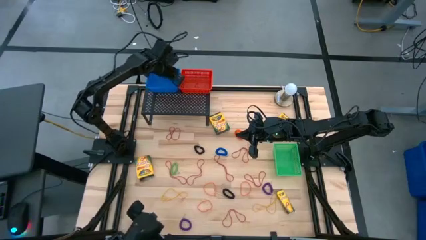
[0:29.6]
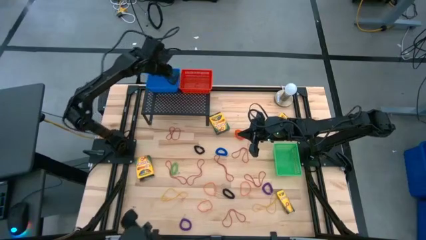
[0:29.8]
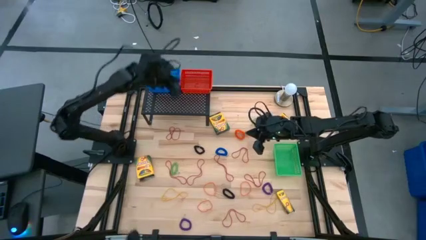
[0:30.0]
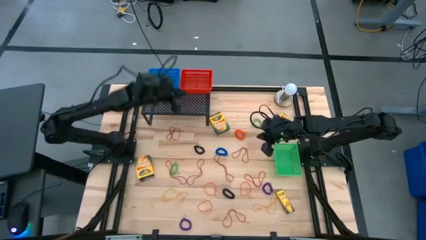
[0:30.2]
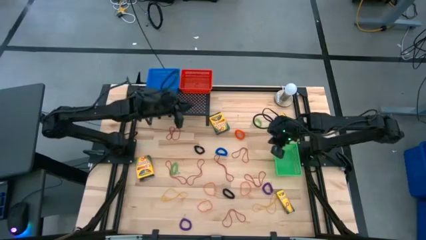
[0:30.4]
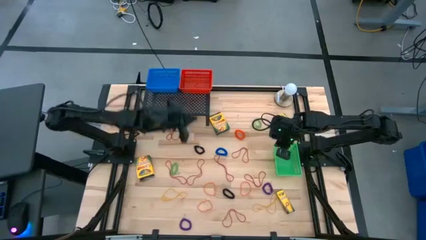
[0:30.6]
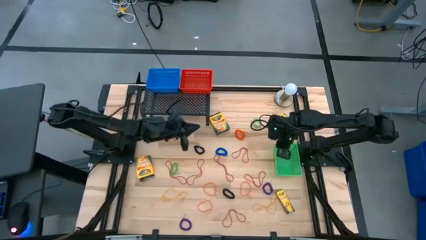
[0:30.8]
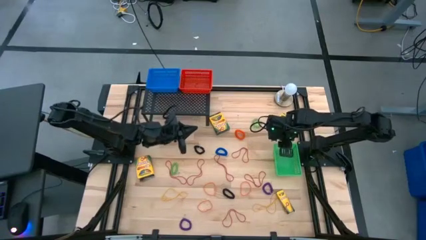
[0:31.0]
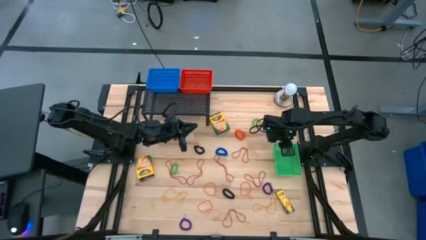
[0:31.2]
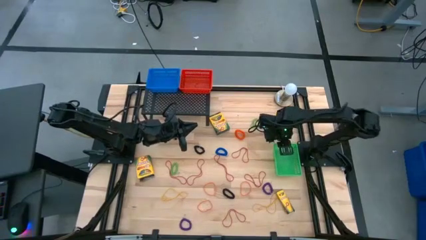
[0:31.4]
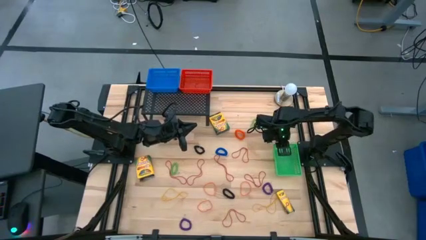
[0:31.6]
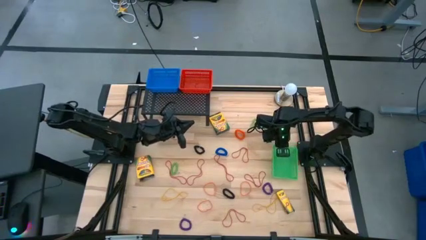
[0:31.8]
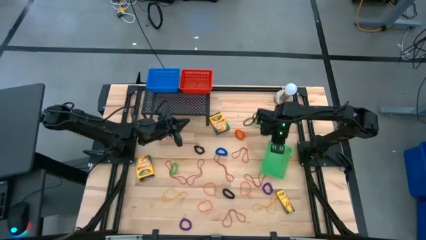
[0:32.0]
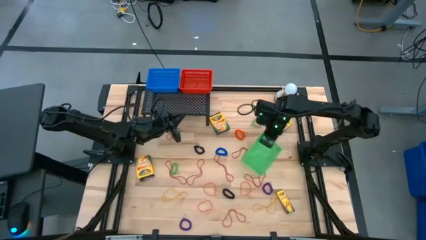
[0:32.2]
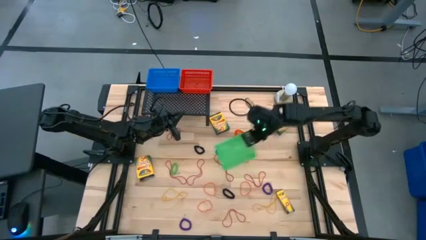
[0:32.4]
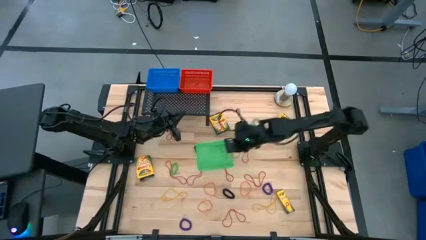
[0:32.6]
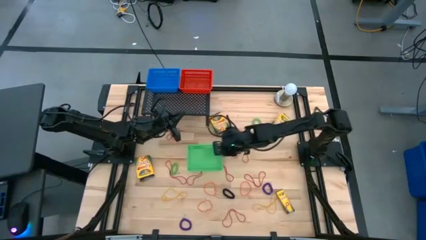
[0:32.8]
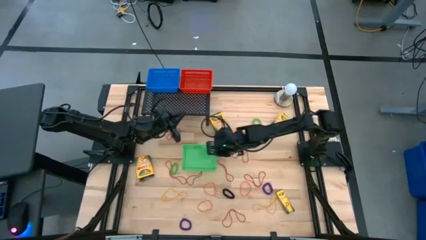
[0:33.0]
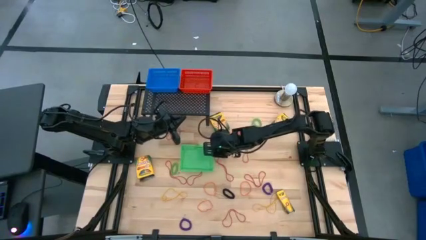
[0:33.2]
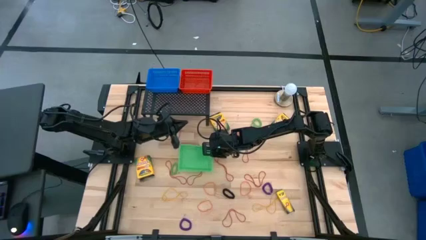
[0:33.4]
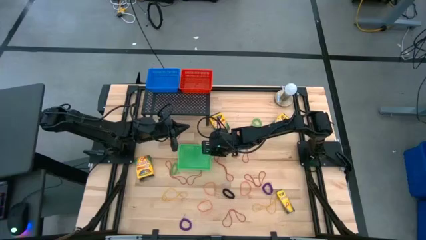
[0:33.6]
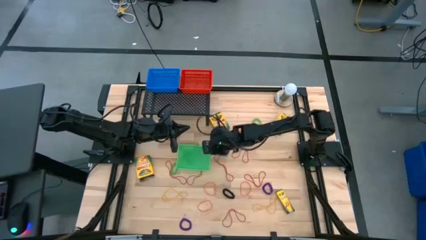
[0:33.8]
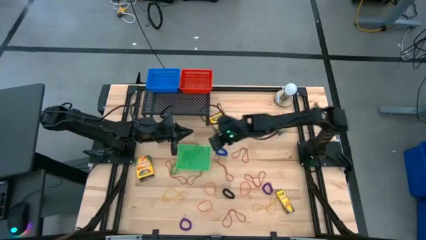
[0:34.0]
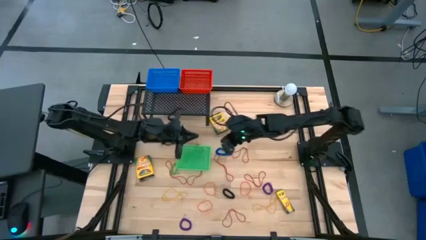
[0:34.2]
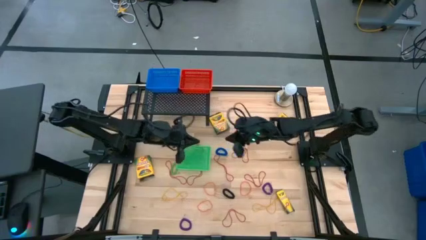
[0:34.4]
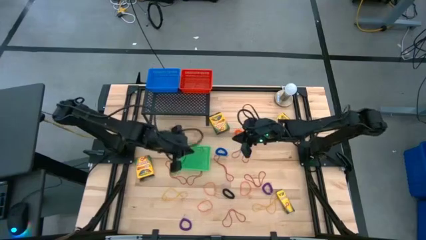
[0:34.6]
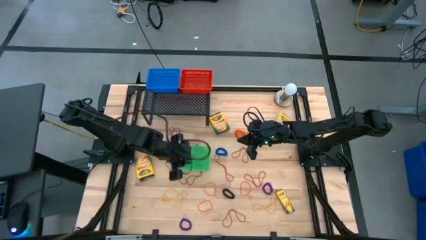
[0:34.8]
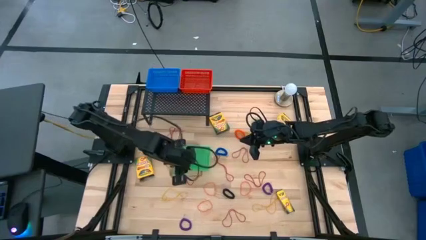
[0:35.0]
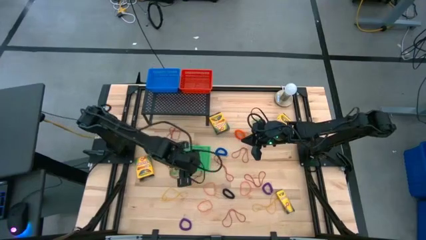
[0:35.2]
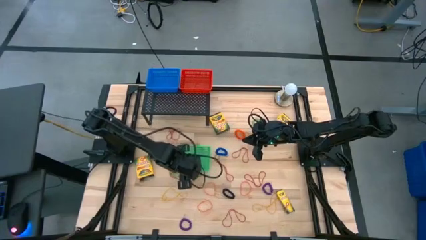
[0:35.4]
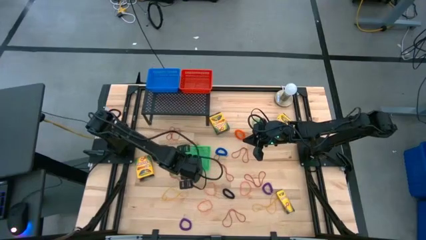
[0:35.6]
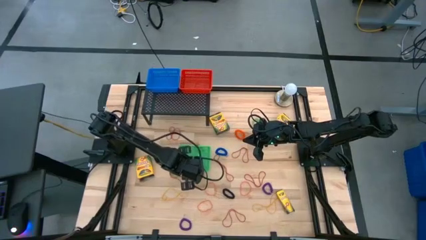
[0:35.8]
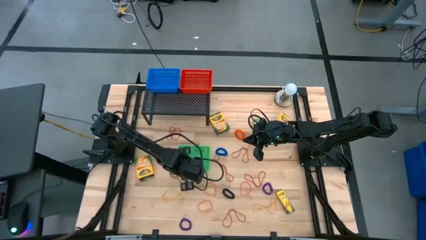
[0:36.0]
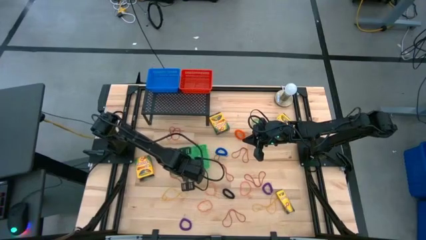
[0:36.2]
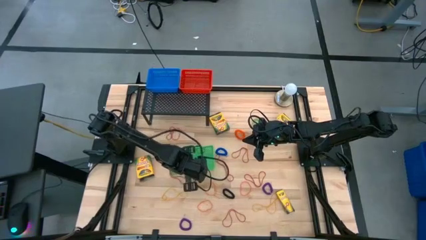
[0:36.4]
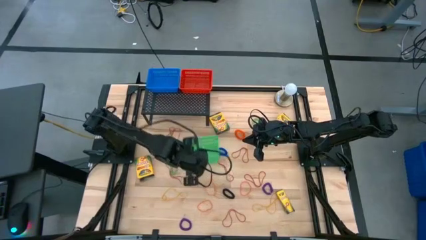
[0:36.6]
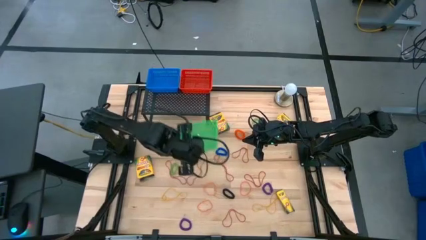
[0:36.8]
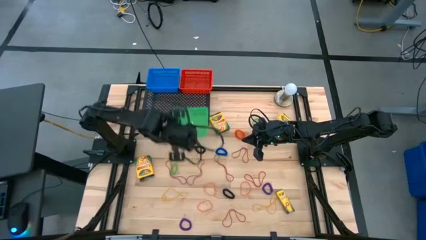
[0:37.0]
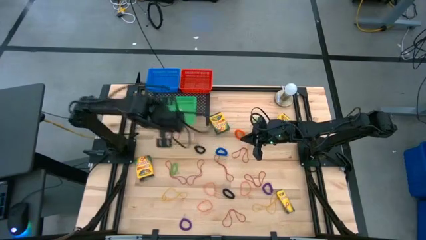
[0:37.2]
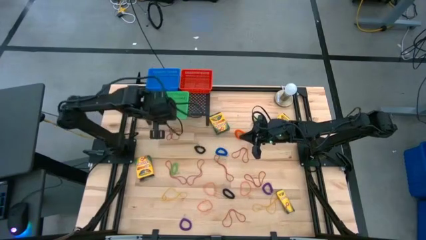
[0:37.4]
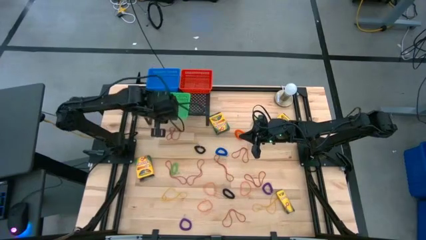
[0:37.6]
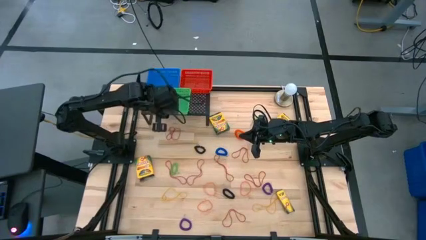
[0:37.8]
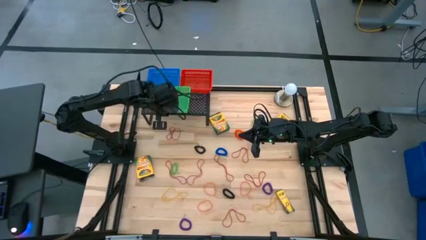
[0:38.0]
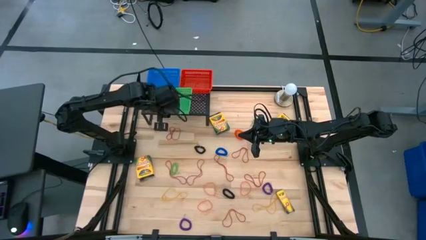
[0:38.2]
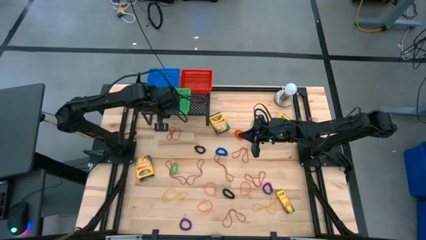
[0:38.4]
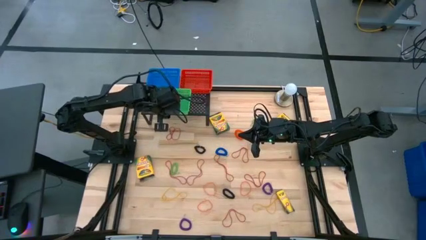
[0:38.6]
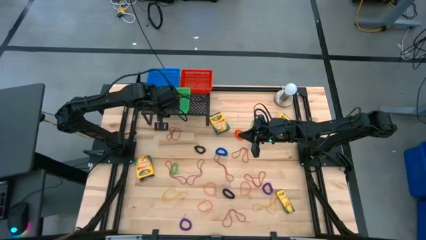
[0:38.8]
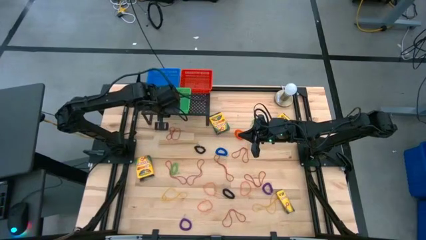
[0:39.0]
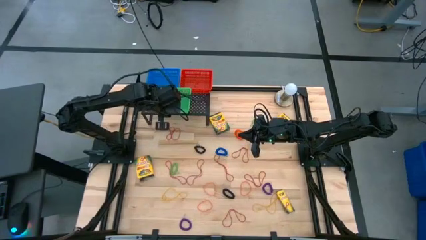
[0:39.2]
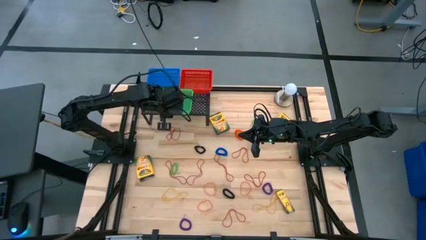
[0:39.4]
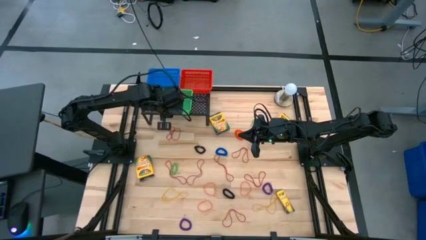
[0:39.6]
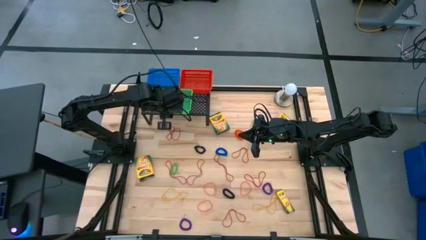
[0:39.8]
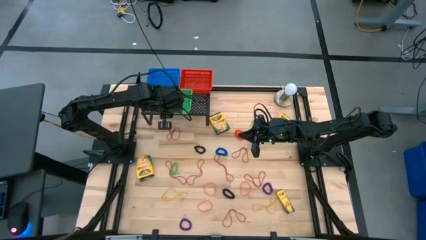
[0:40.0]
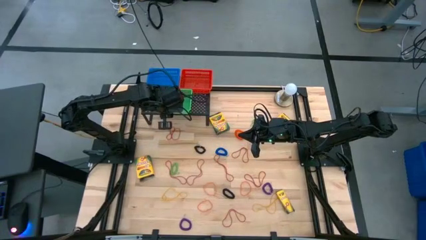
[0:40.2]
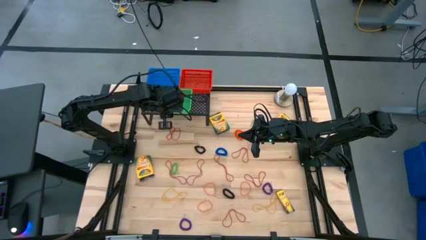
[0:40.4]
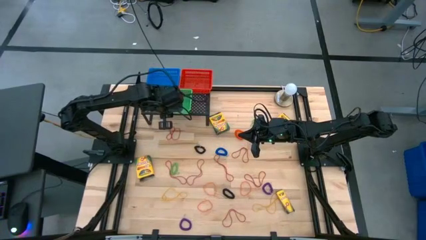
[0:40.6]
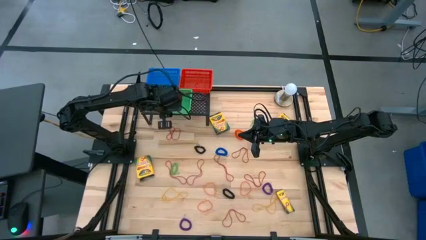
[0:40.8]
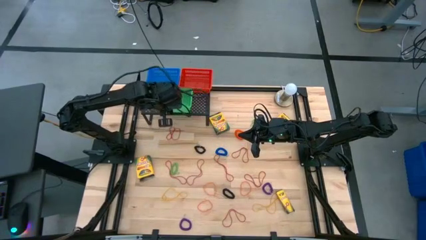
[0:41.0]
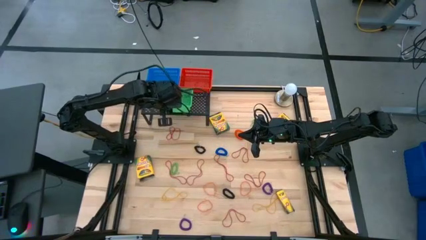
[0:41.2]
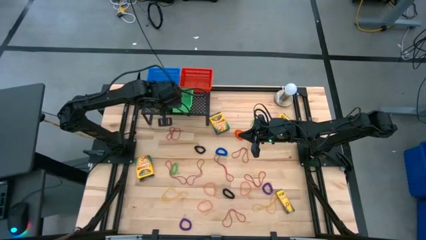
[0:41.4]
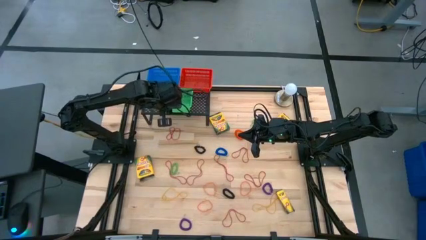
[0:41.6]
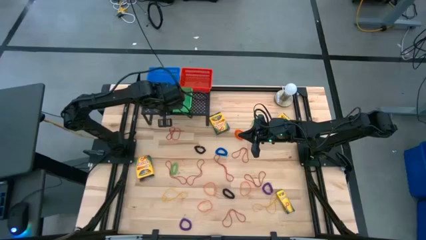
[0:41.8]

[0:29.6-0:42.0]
Task: Pick & Place Office Desk Supplies
Put the green bin on the shelf

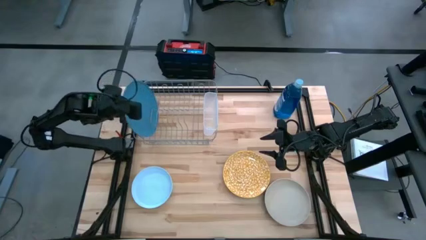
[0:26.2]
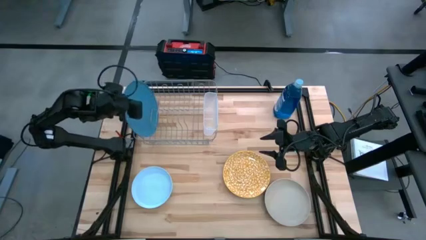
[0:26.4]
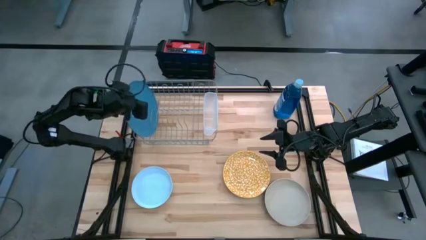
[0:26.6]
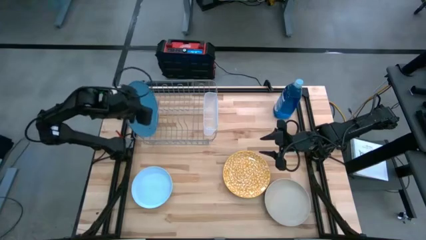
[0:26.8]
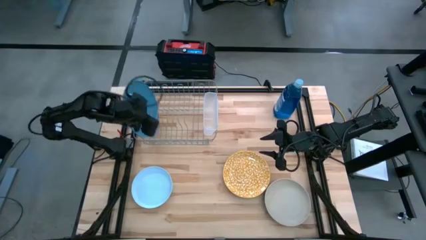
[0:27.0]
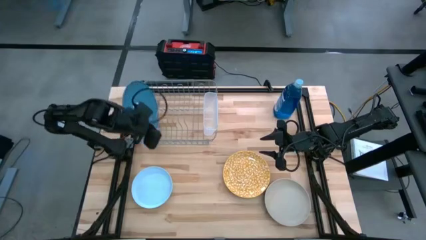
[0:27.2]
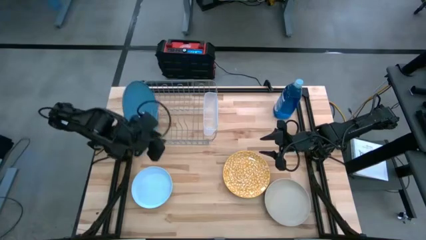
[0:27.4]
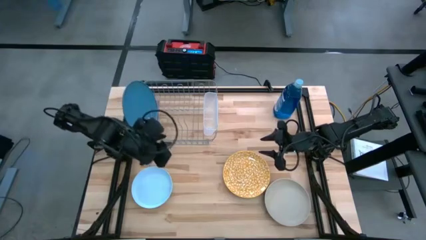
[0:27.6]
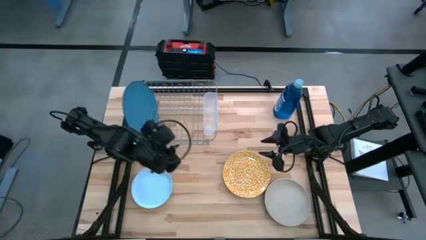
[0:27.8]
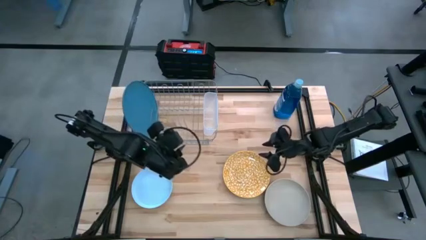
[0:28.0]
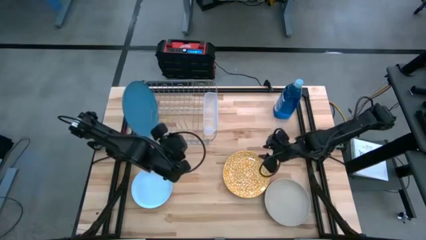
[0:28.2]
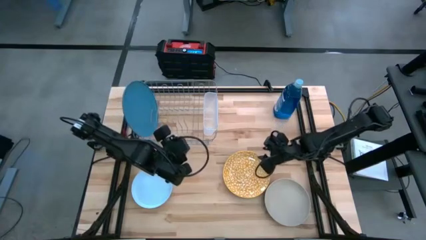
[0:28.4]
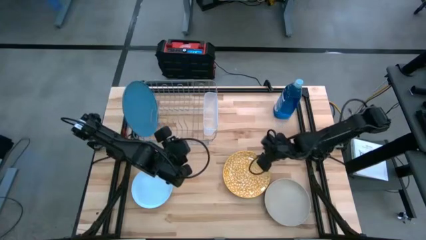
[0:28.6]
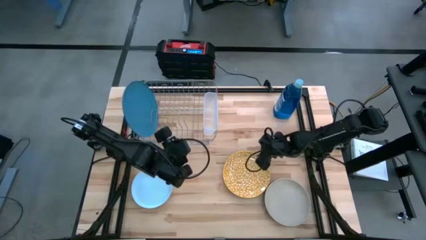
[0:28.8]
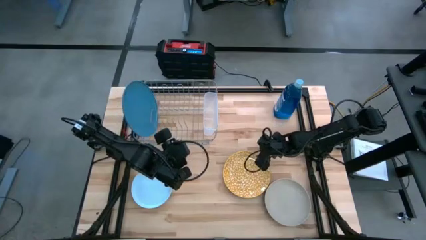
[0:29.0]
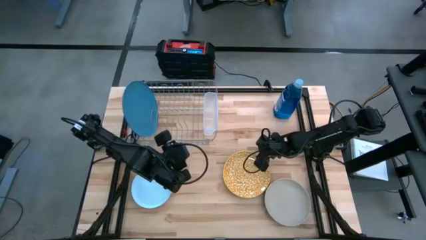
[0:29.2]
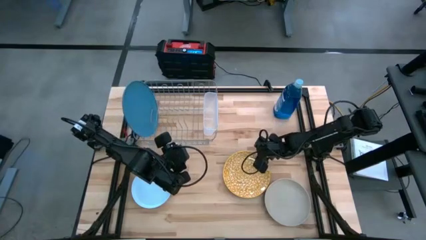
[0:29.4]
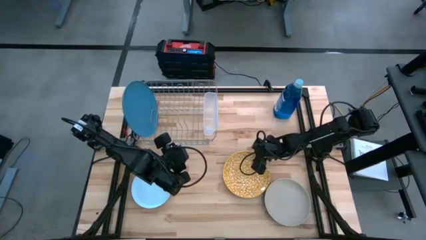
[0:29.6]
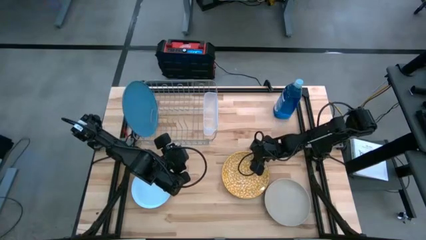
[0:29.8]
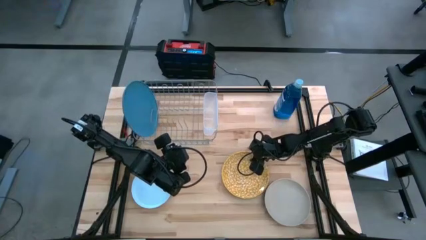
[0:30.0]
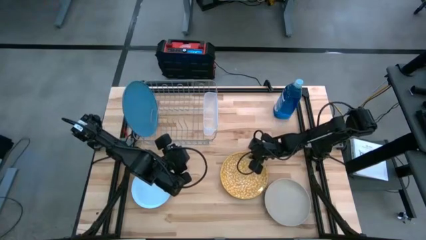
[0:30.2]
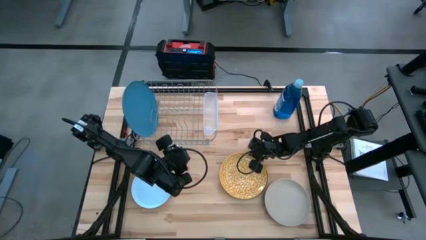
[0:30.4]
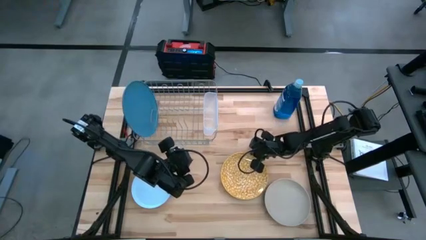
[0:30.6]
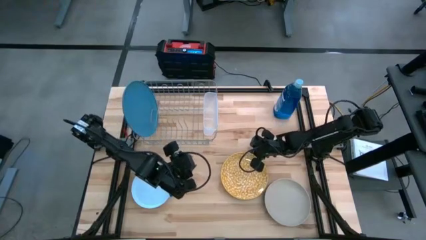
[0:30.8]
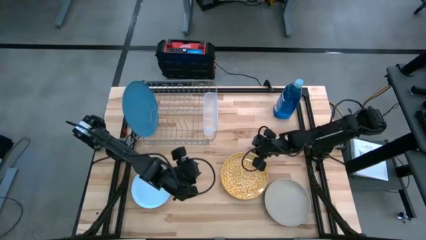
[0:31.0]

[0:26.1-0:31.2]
Task: Sort dishes
Put the yellow plate in the dish rack
